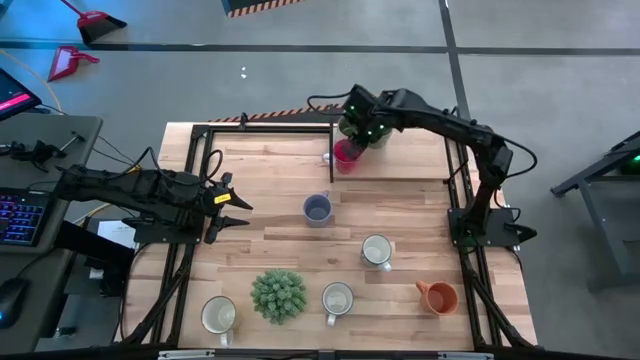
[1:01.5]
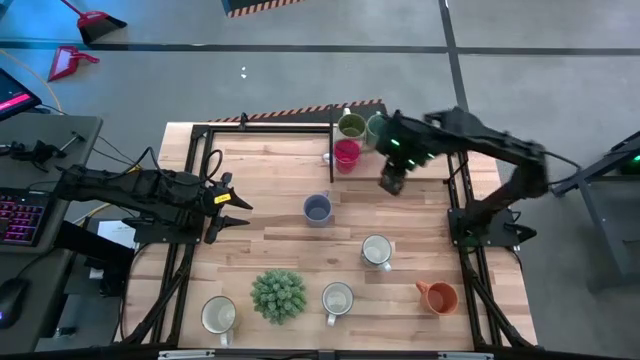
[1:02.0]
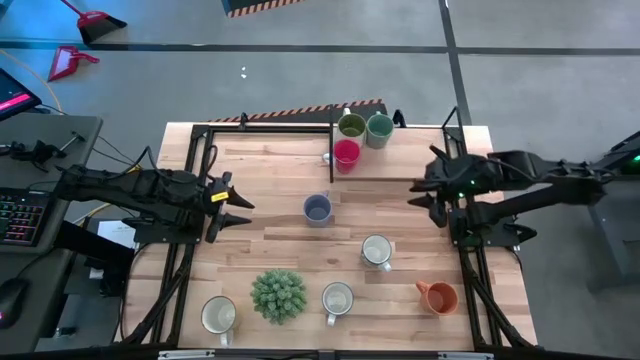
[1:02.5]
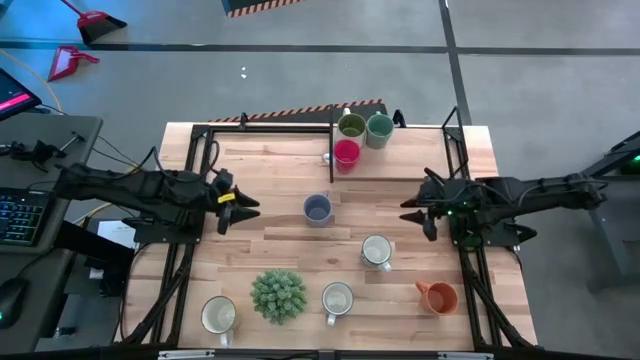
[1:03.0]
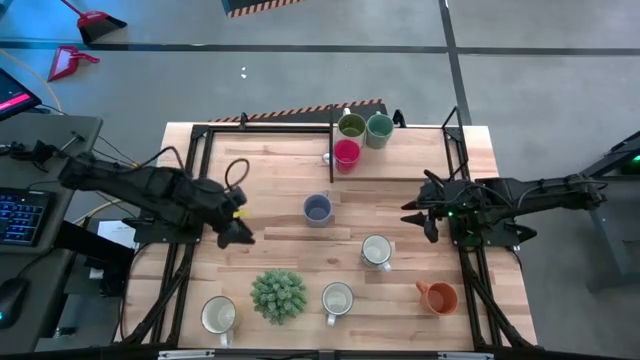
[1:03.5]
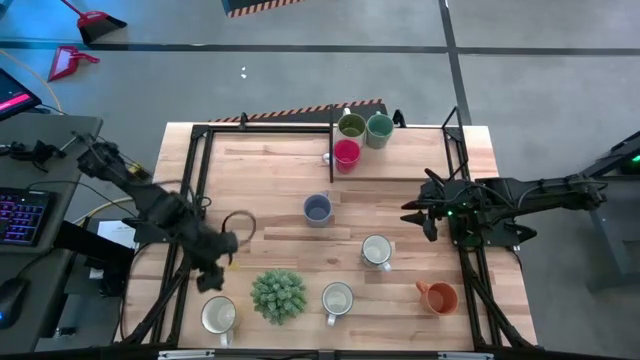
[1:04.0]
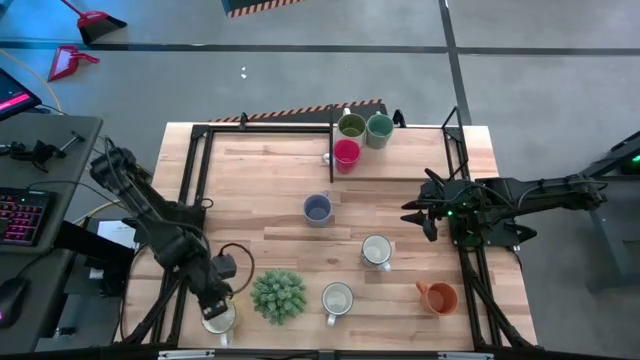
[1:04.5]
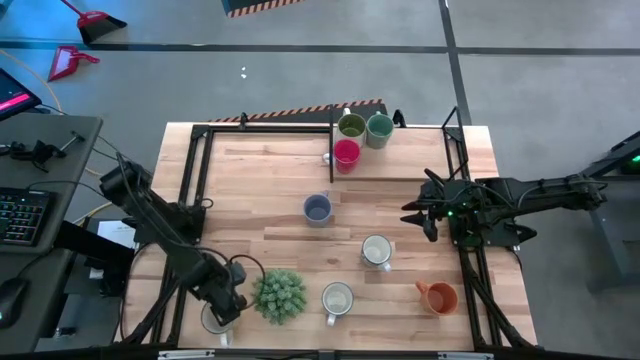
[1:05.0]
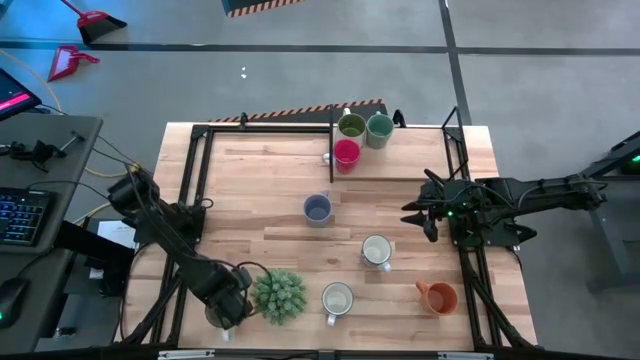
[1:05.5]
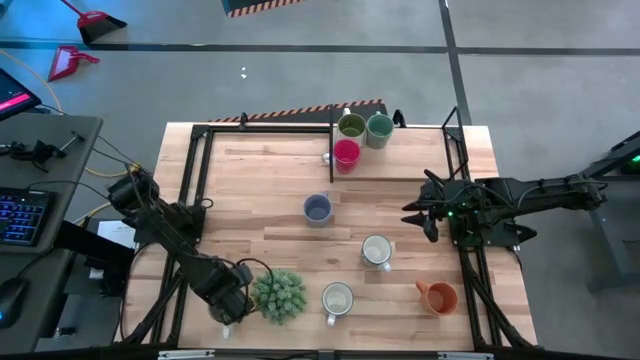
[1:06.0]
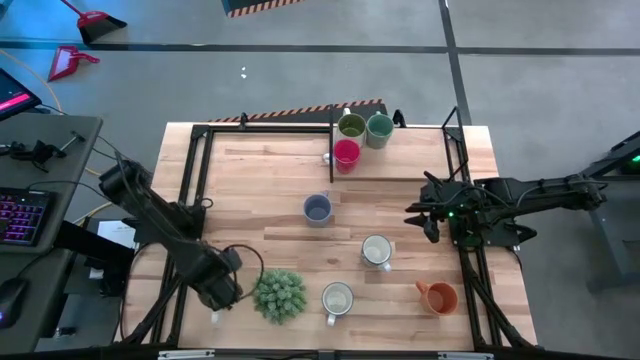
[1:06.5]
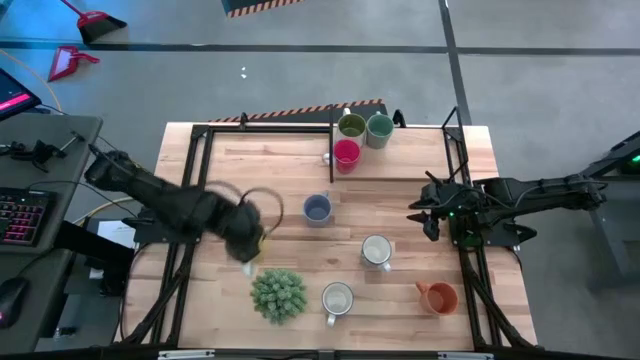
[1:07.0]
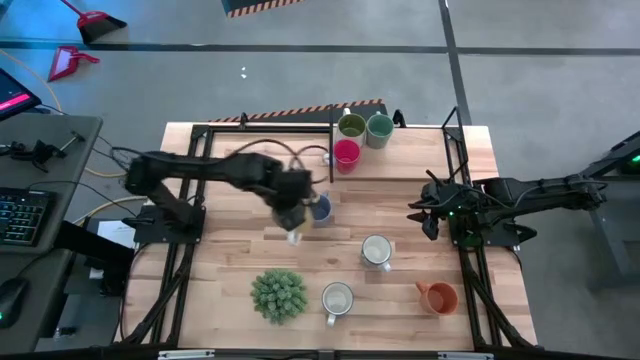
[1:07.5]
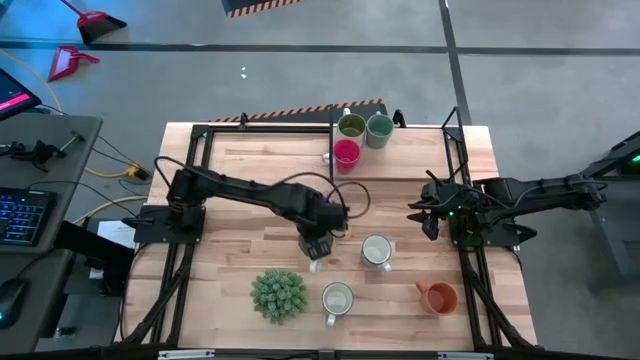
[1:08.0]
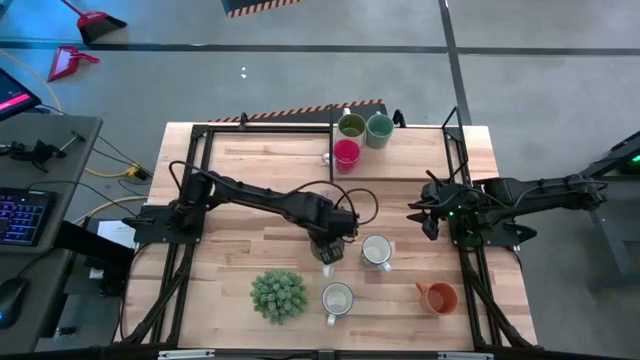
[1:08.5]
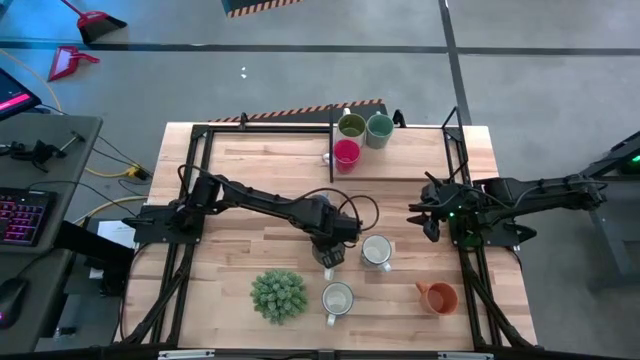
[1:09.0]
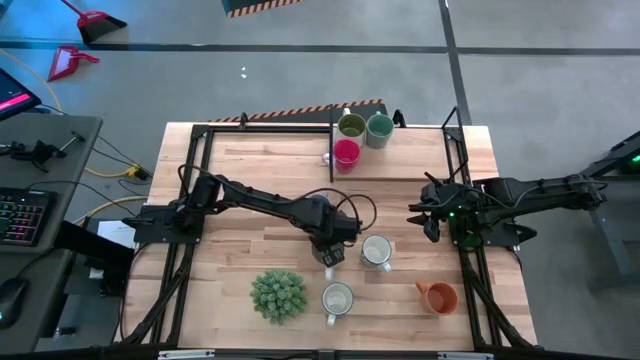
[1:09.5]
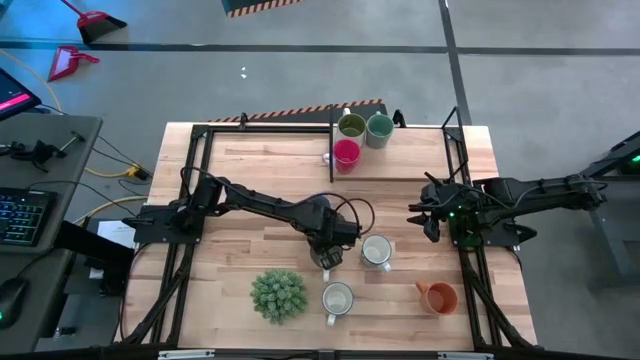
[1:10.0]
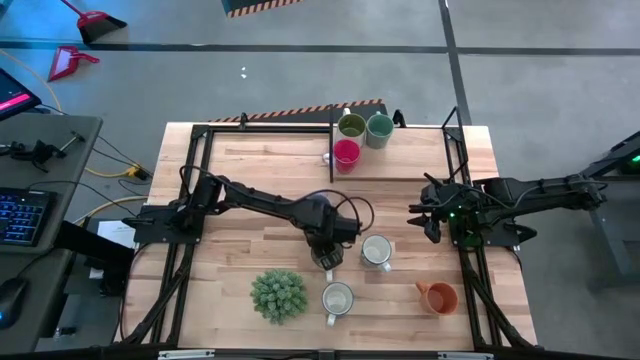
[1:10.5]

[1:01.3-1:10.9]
Task: Place coffee mugs
Move the yellow mug to the center of the table

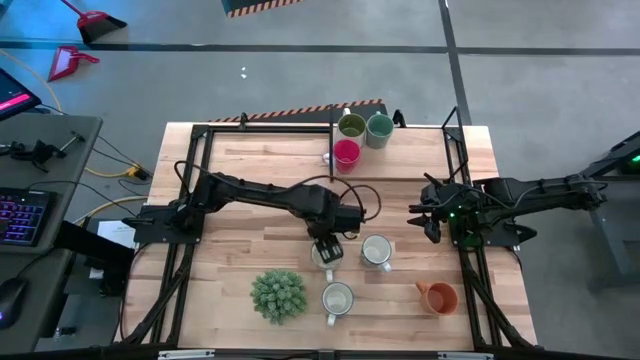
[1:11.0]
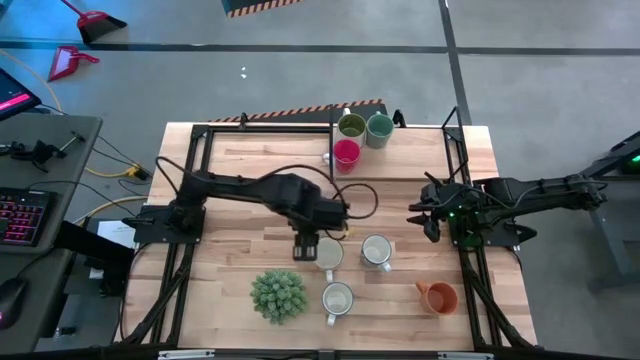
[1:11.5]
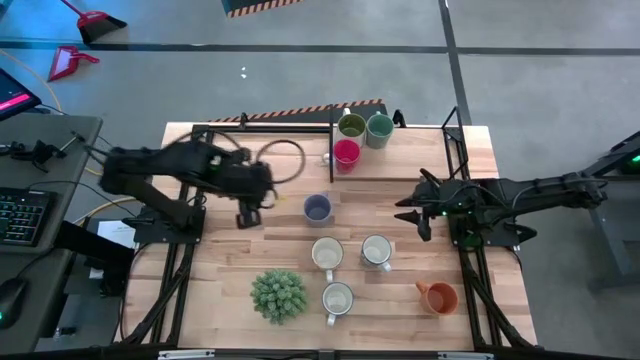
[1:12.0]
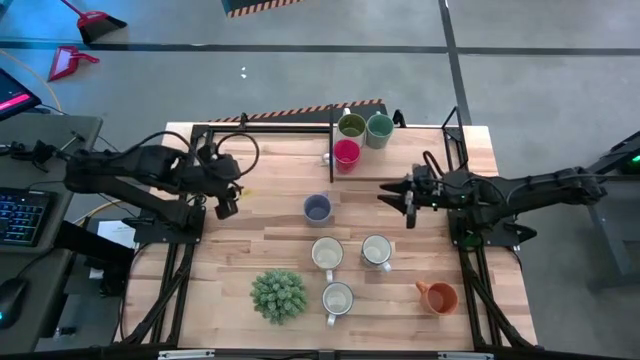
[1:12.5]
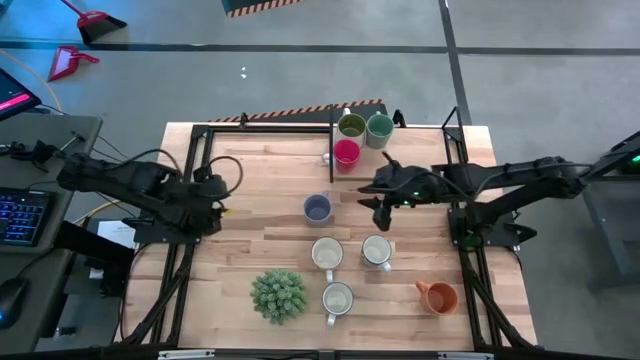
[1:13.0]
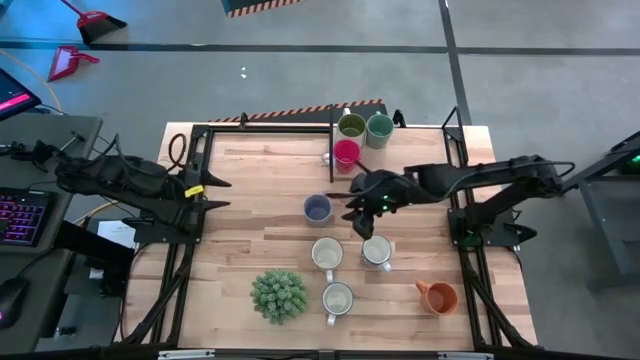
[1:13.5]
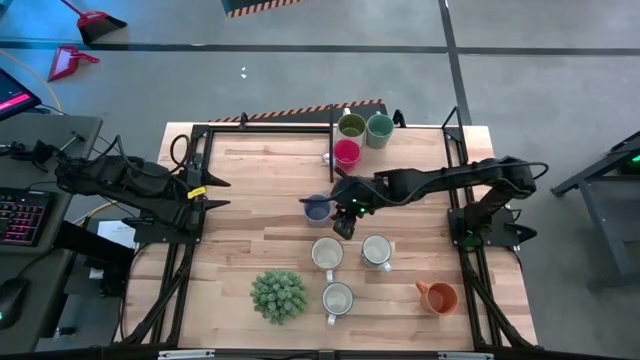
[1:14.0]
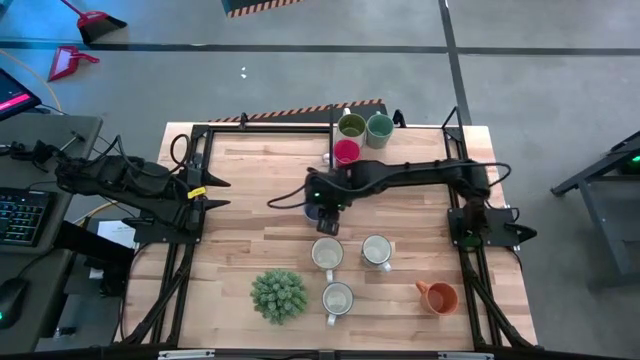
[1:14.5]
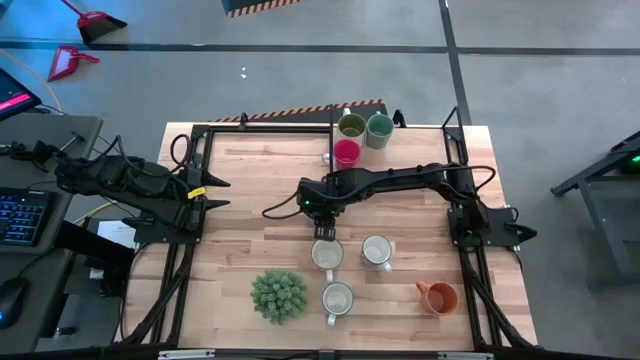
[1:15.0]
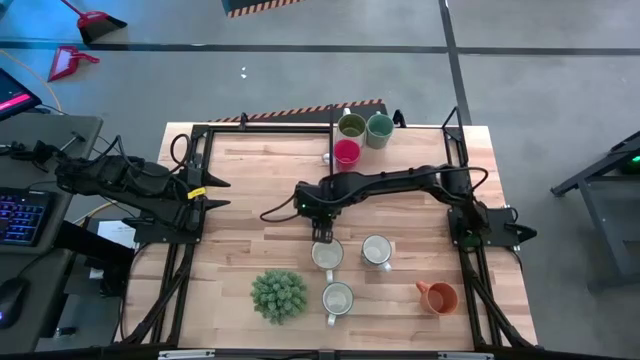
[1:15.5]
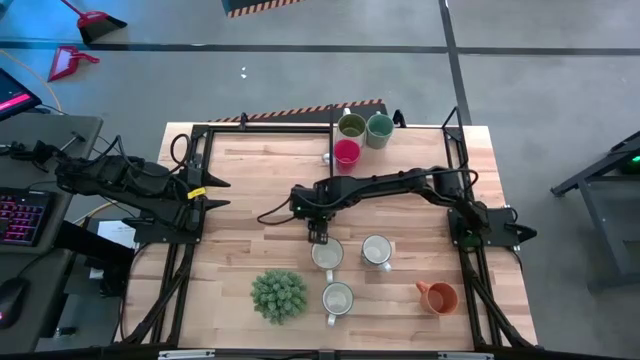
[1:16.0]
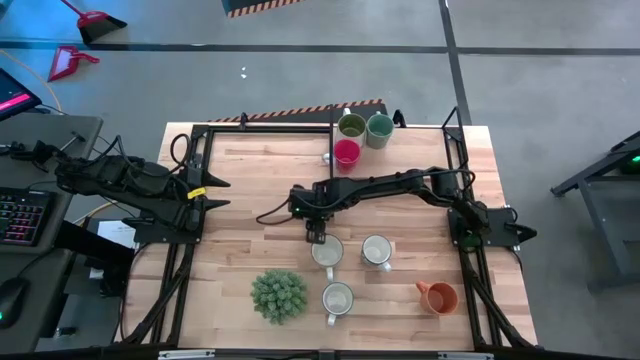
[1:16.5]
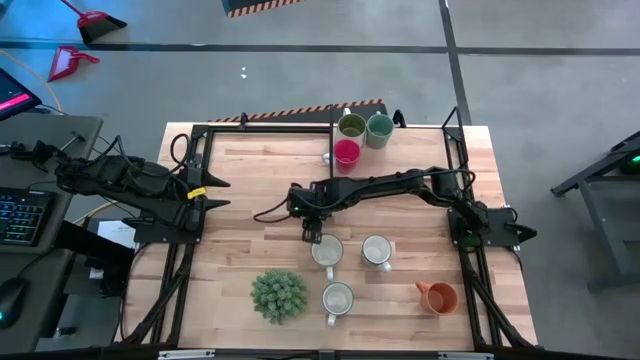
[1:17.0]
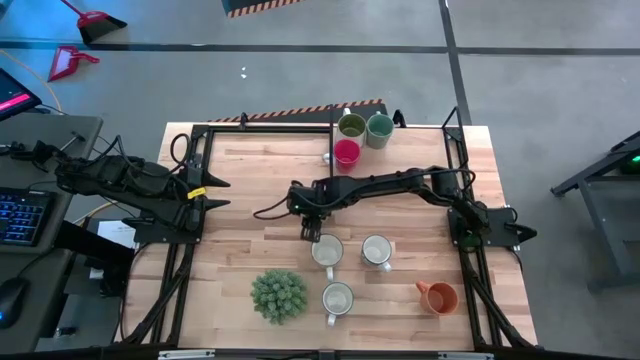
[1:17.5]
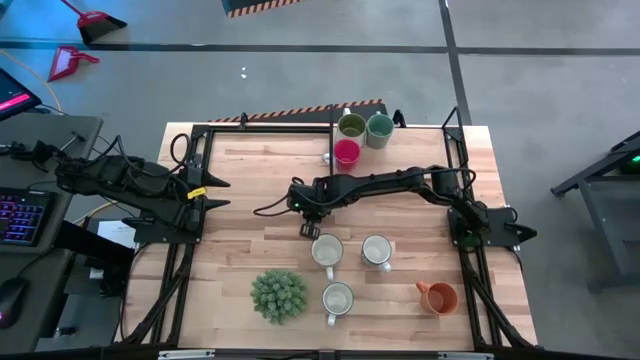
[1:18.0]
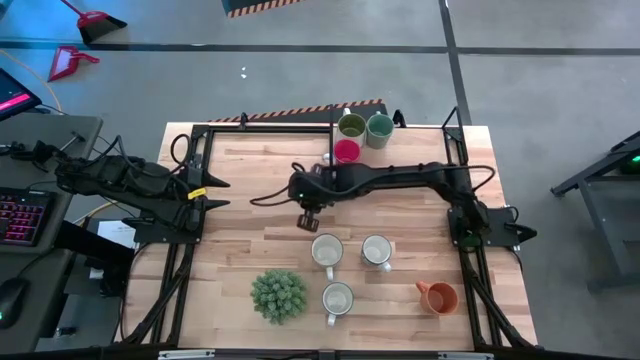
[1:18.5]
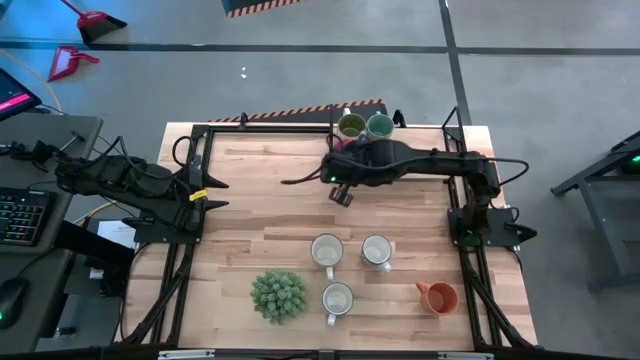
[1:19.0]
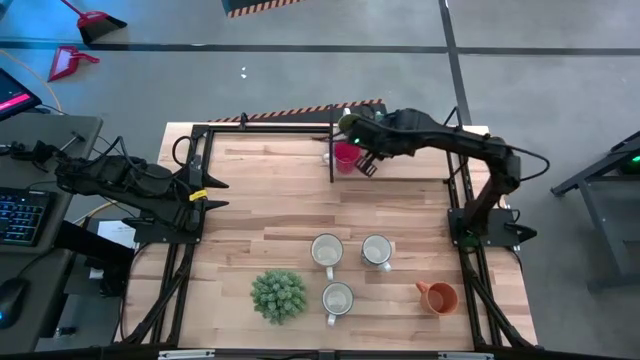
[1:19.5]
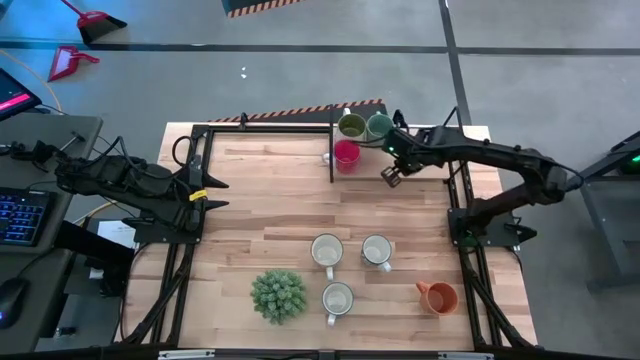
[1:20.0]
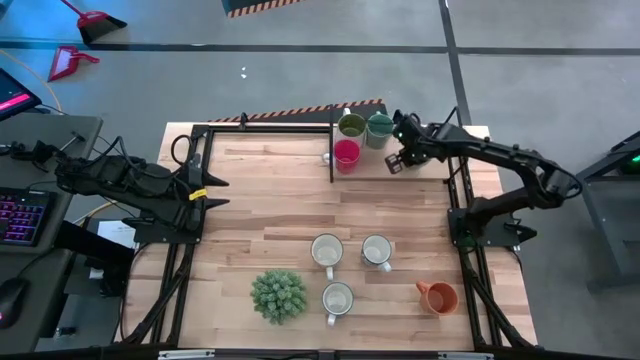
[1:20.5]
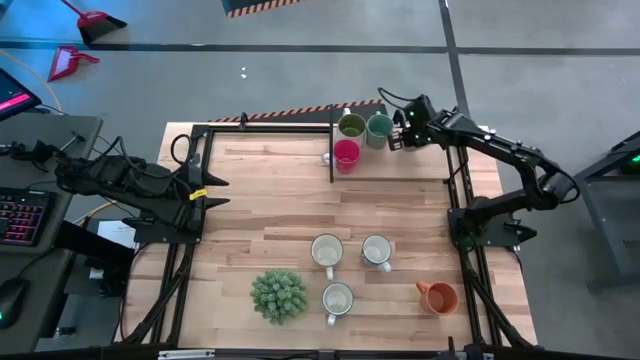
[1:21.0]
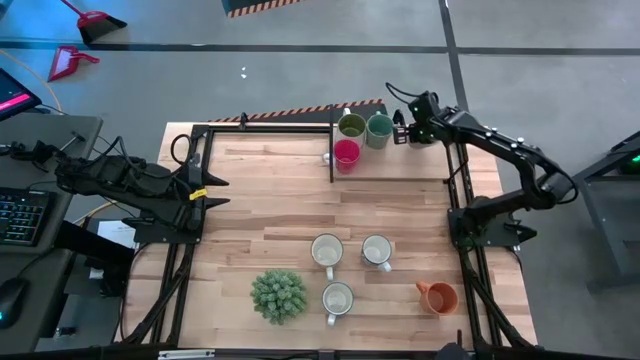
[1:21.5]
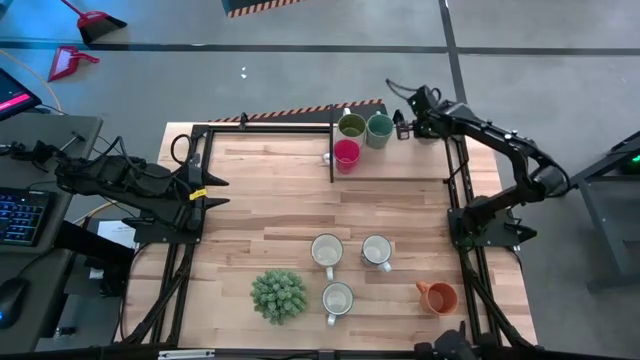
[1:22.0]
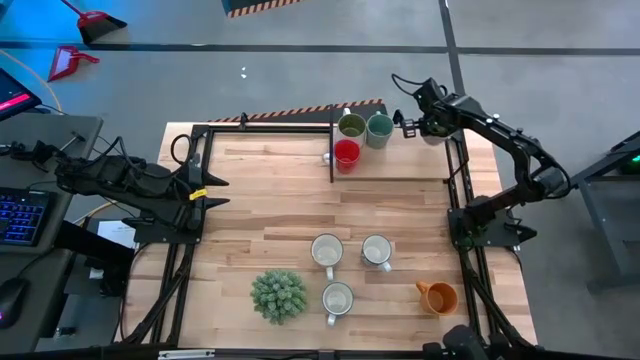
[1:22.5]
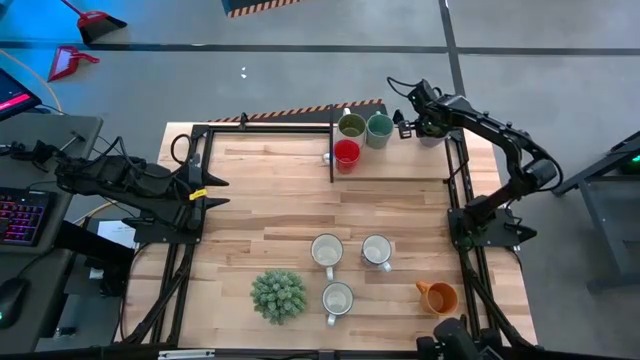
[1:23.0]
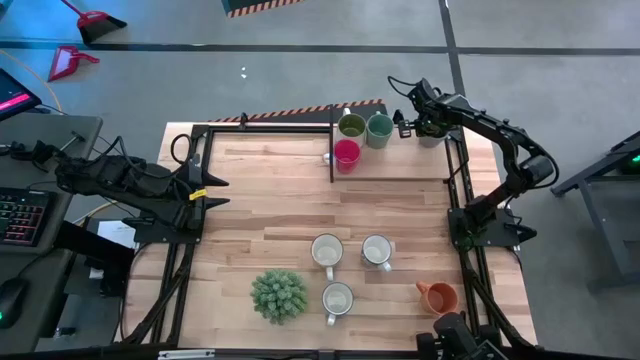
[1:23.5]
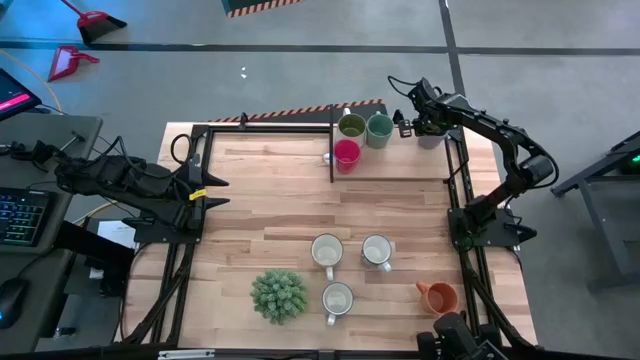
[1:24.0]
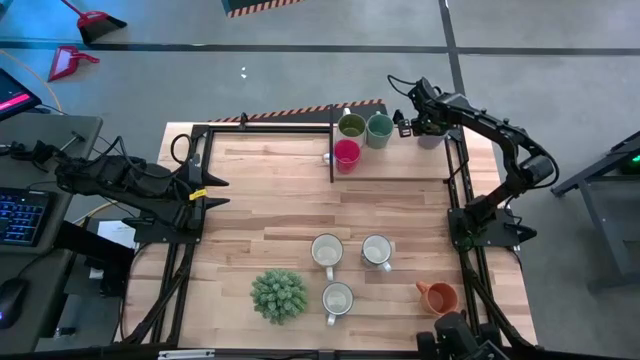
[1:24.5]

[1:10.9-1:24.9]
Put the blue mug on the shelf
